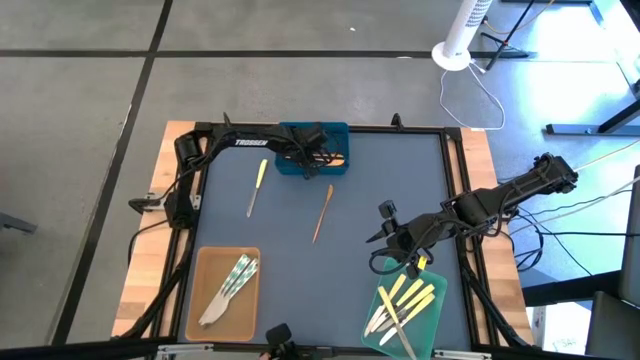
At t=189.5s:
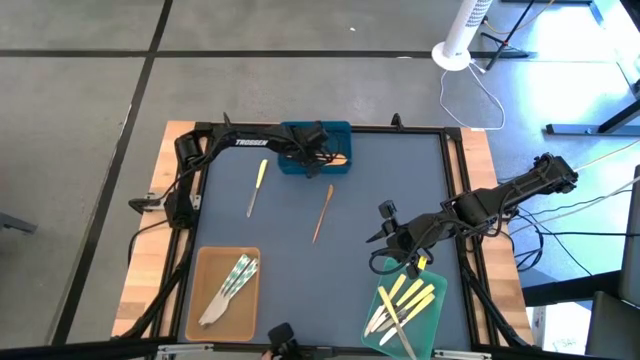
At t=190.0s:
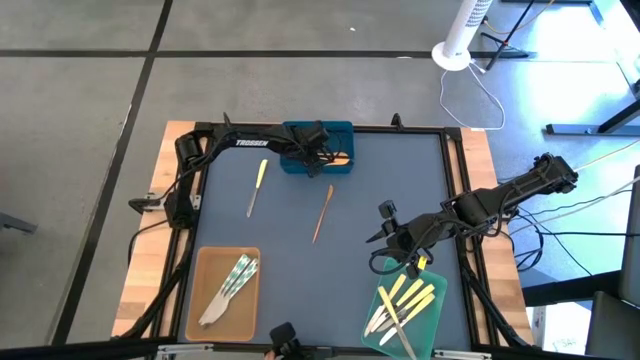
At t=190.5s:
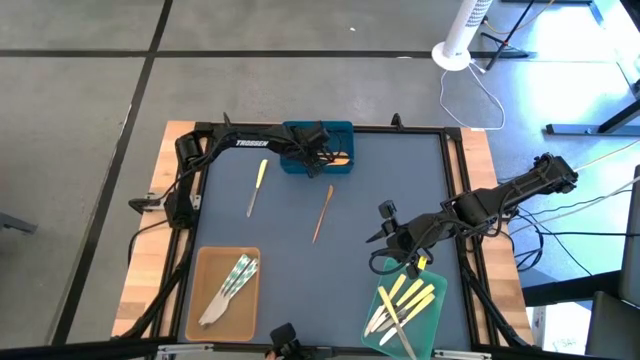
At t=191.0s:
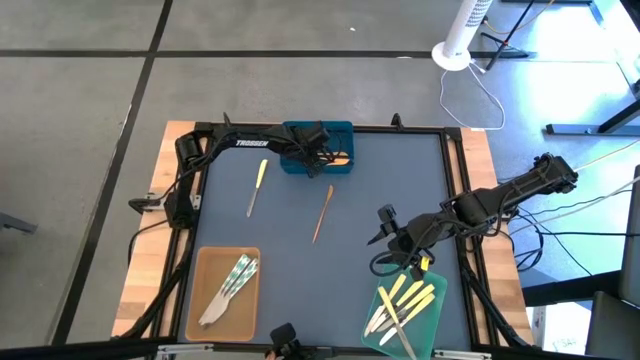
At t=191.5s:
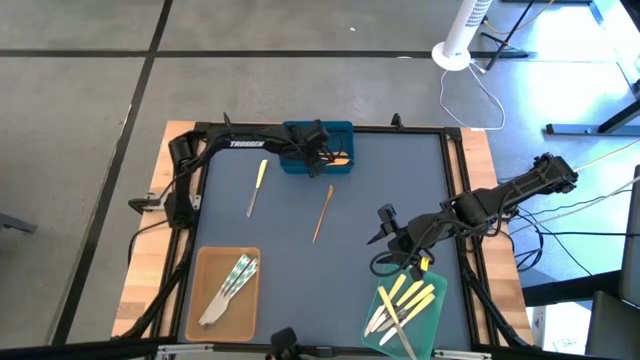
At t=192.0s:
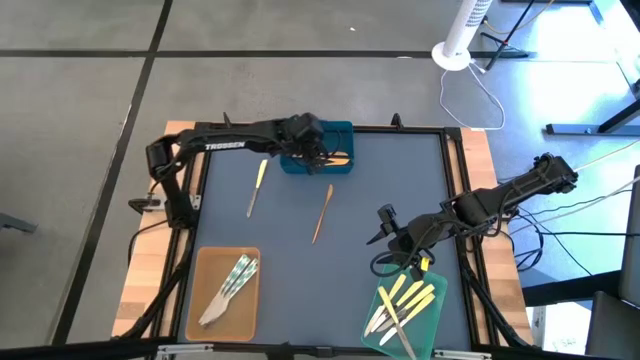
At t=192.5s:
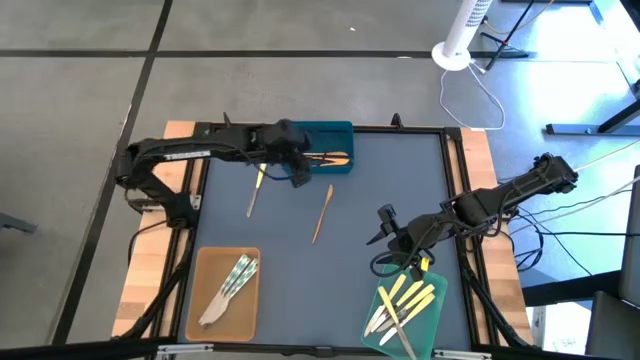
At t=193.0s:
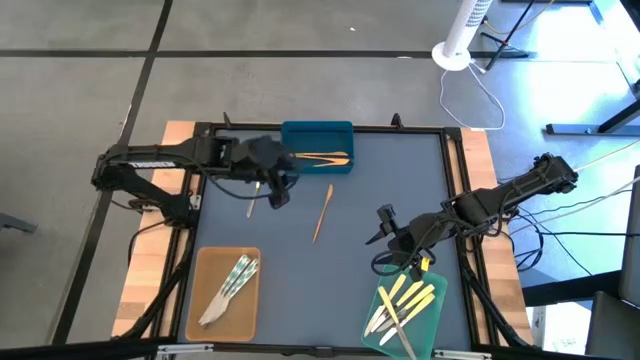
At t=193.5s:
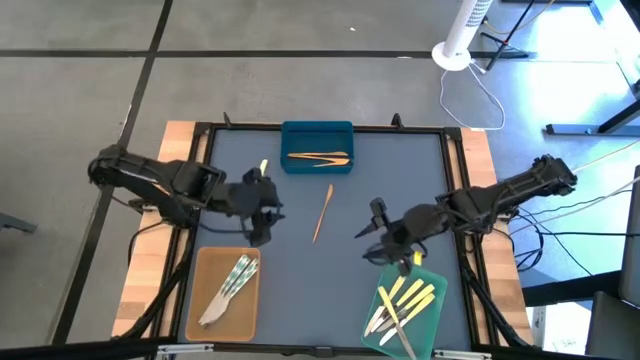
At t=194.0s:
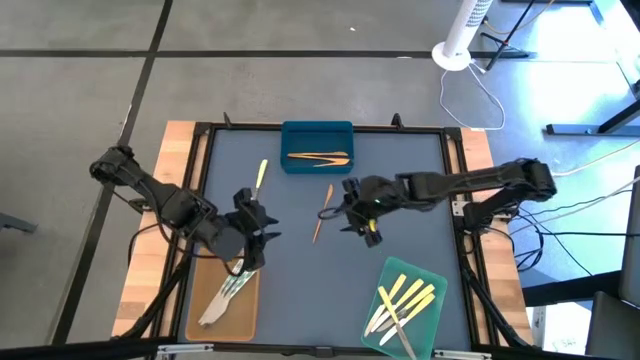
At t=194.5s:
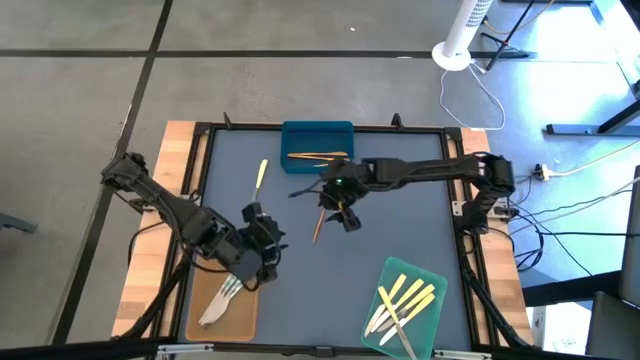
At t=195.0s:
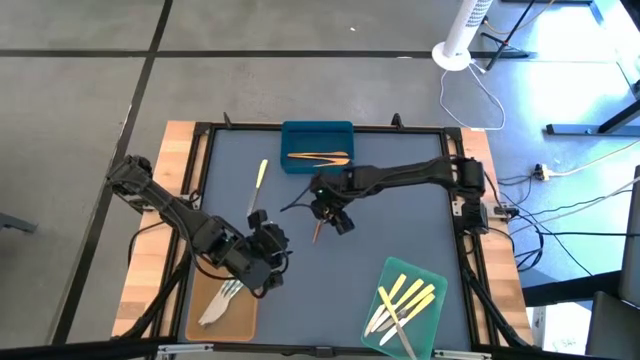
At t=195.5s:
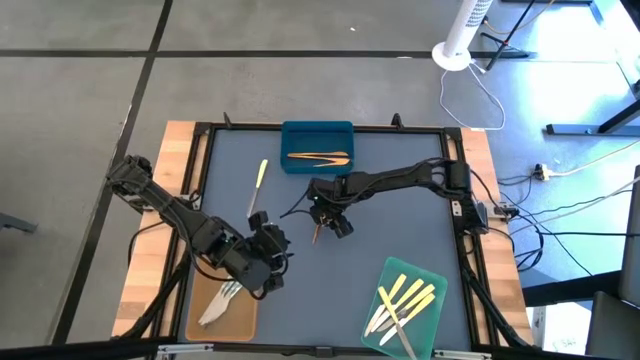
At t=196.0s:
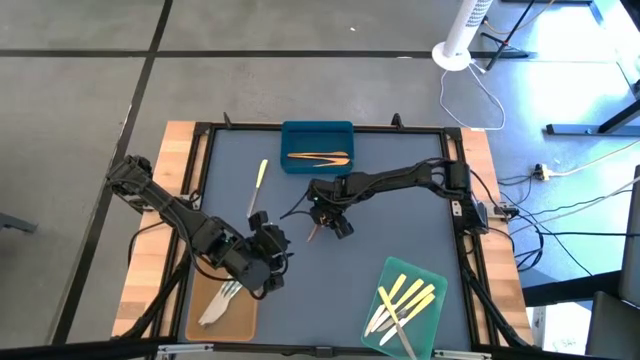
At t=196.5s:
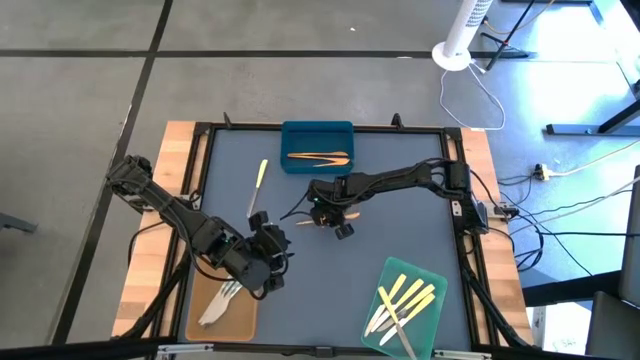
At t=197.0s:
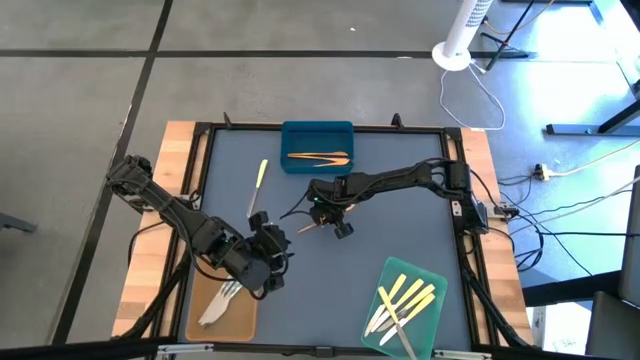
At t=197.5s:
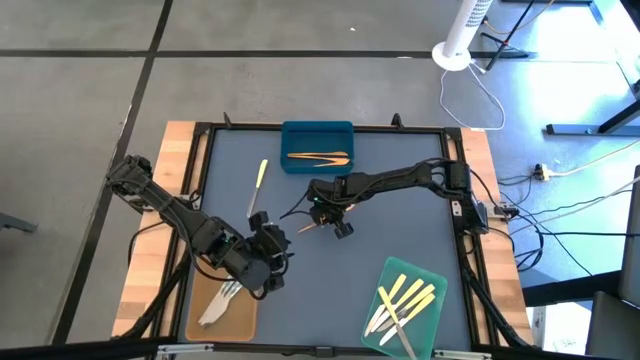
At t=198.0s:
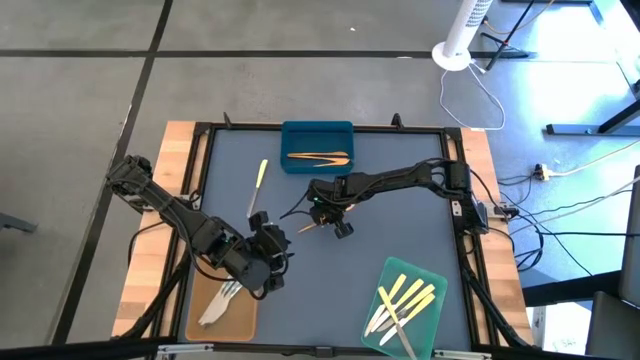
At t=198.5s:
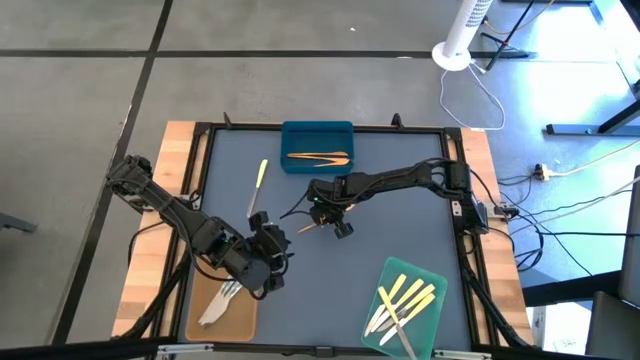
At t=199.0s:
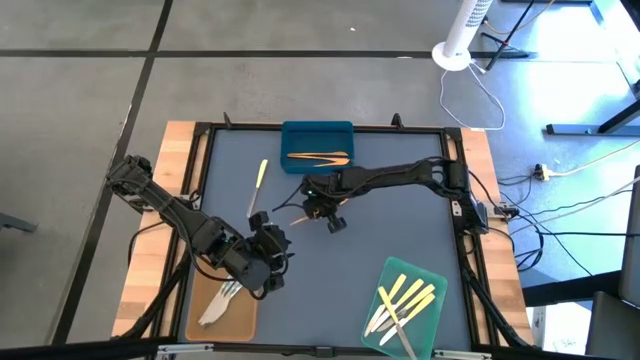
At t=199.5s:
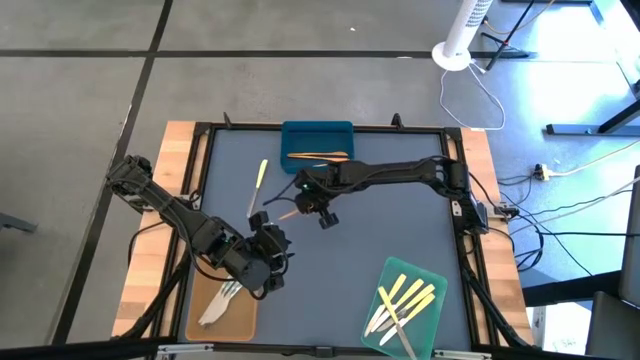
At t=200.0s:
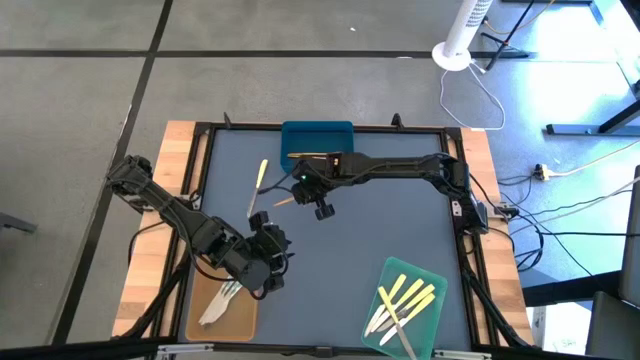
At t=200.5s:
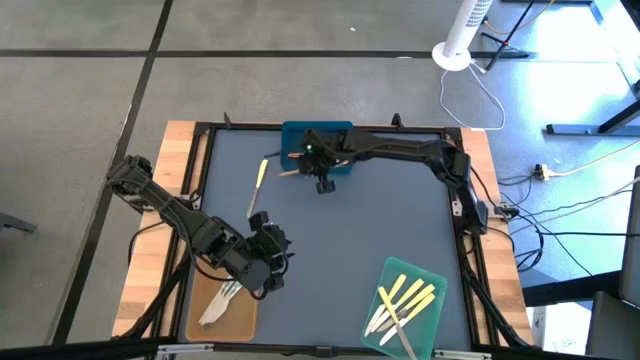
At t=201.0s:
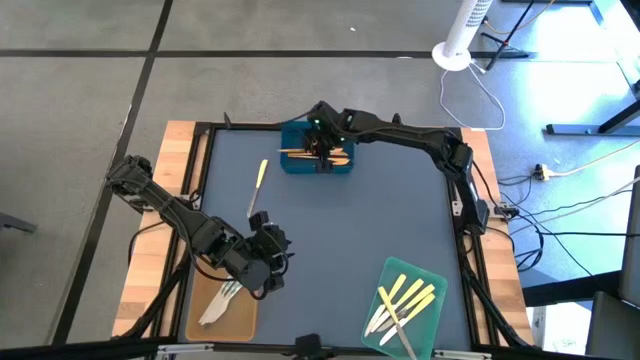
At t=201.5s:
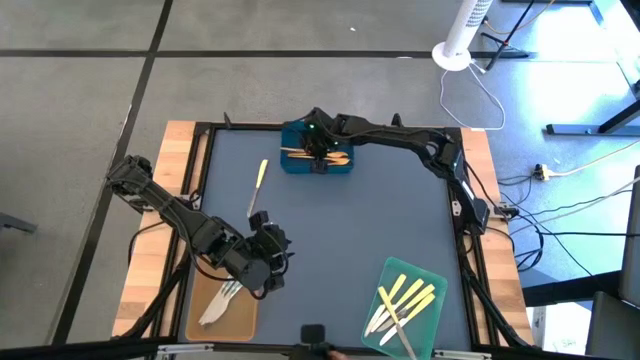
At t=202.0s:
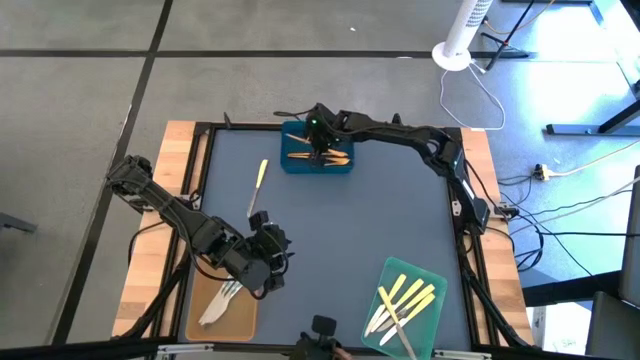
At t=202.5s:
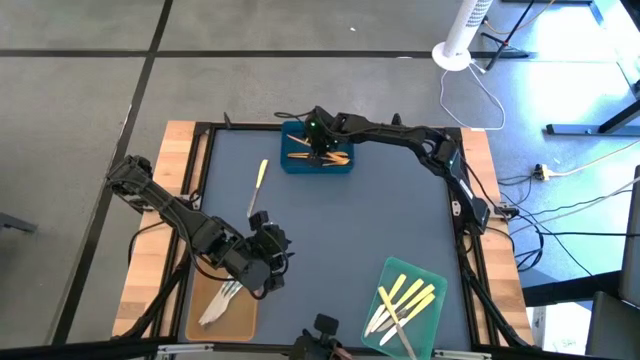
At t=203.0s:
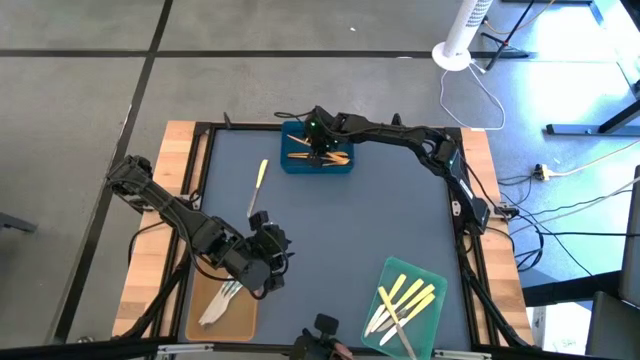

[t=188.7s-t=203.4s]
Task: Sort silverware by color (type)
Put the gold knife into the blue bin

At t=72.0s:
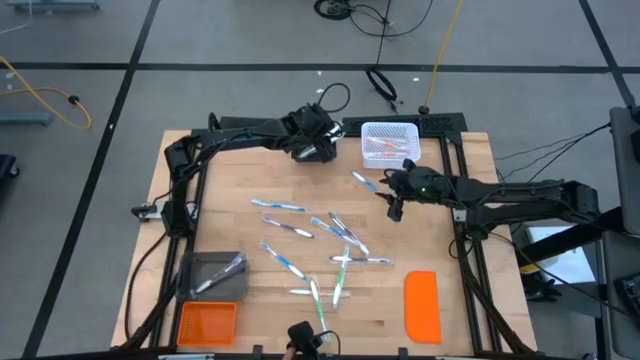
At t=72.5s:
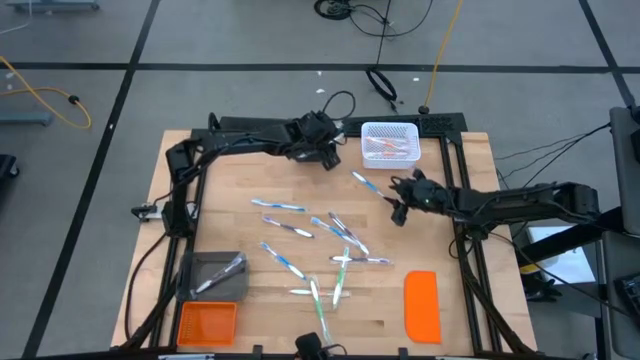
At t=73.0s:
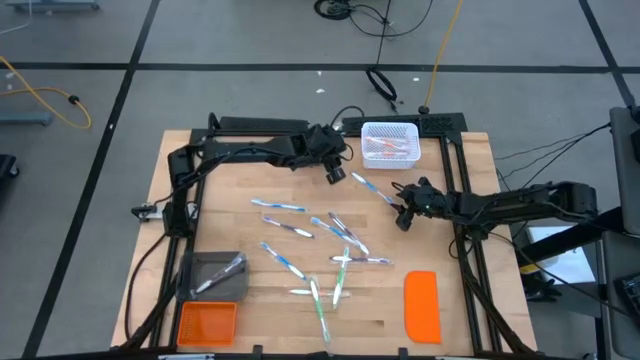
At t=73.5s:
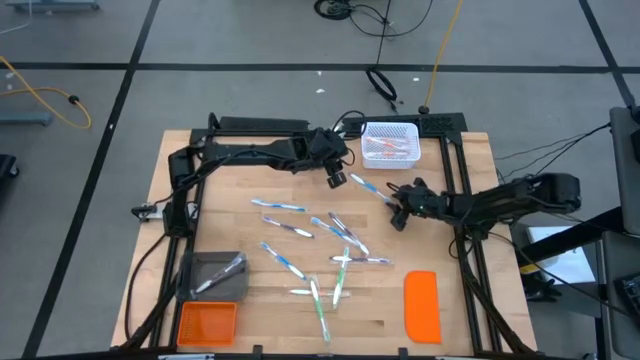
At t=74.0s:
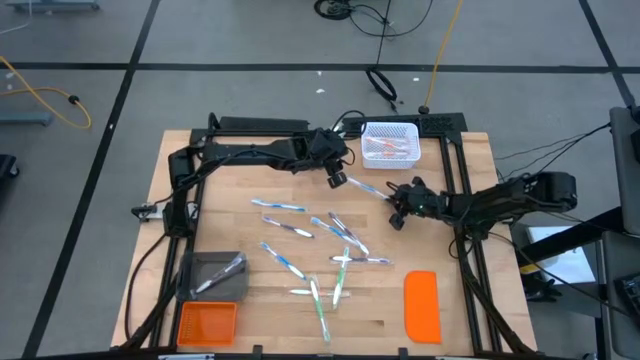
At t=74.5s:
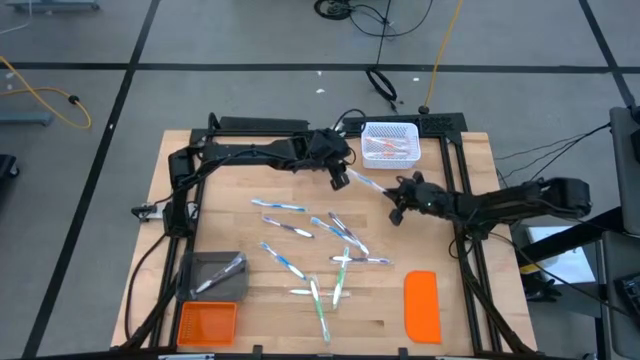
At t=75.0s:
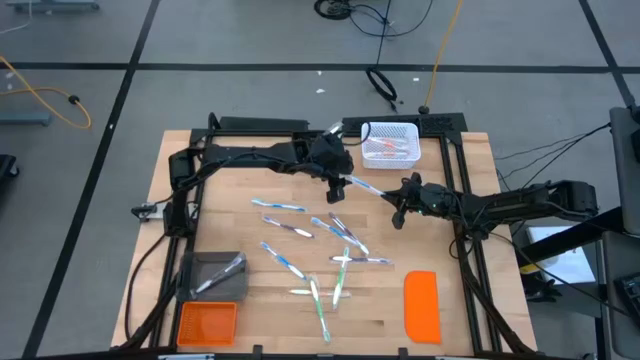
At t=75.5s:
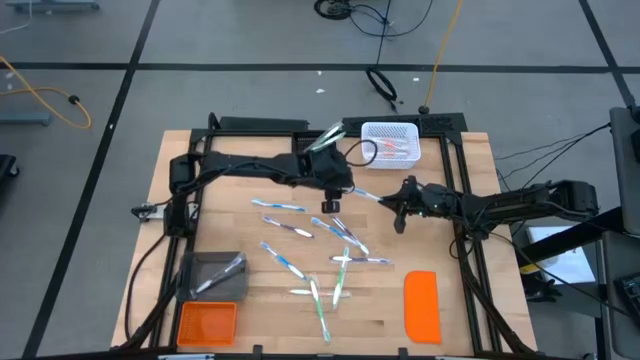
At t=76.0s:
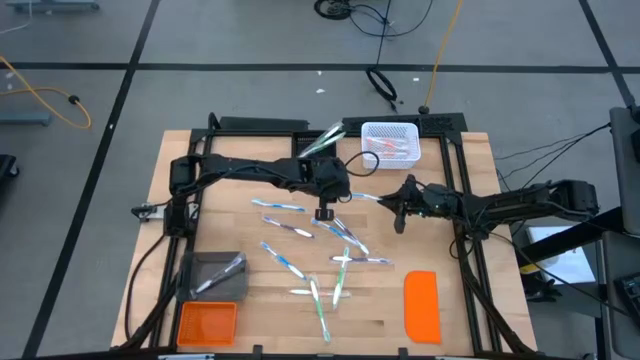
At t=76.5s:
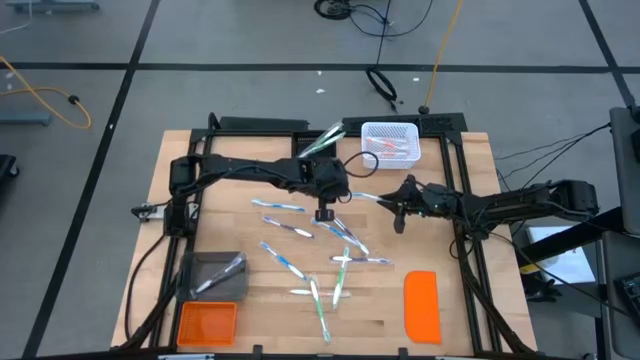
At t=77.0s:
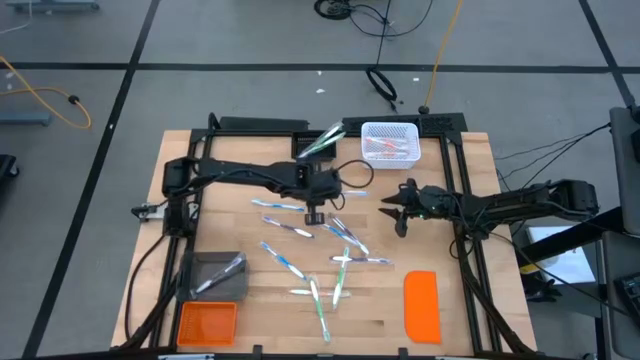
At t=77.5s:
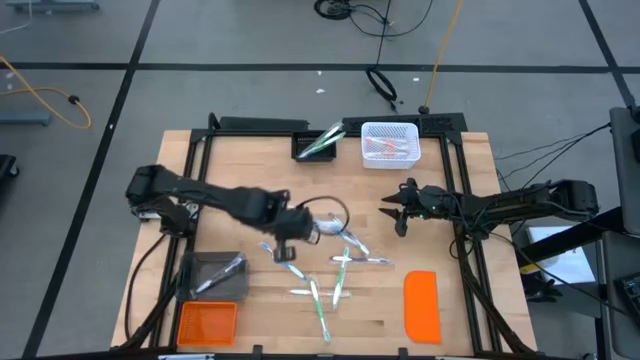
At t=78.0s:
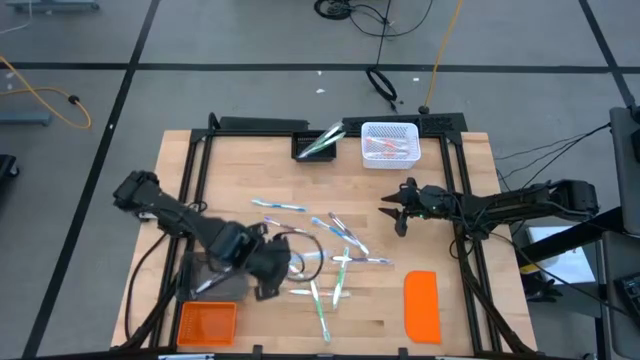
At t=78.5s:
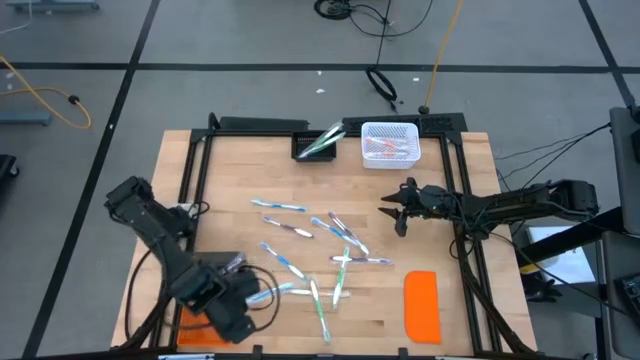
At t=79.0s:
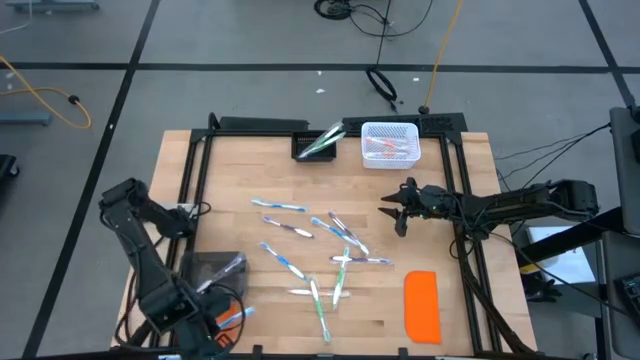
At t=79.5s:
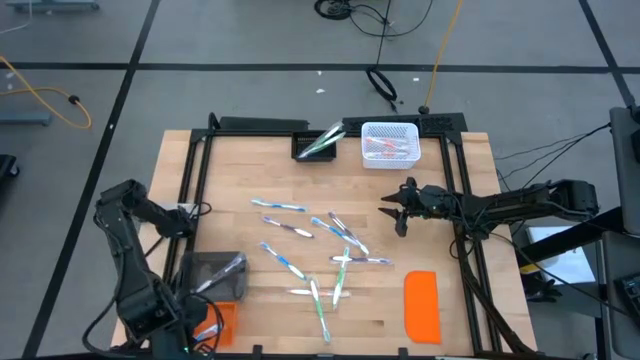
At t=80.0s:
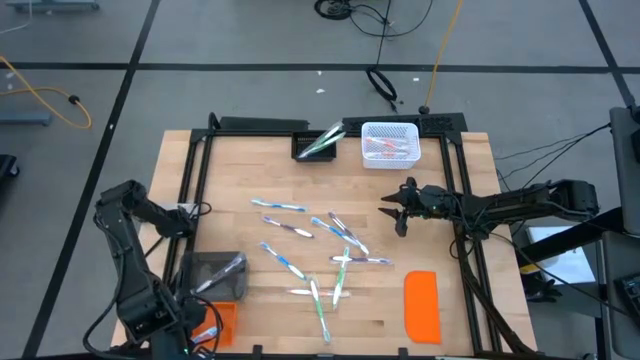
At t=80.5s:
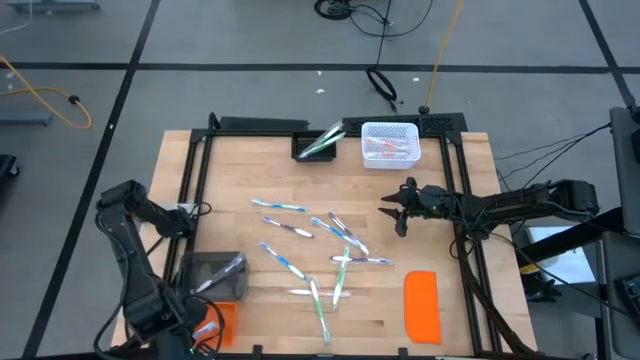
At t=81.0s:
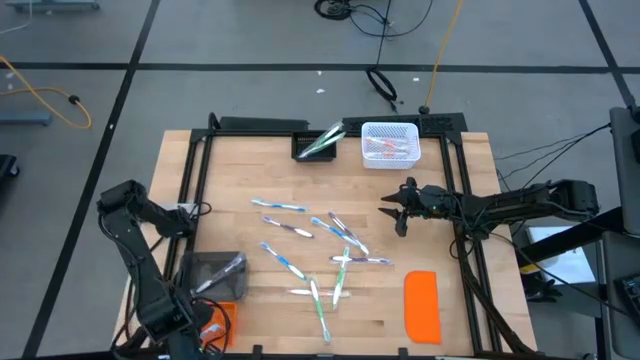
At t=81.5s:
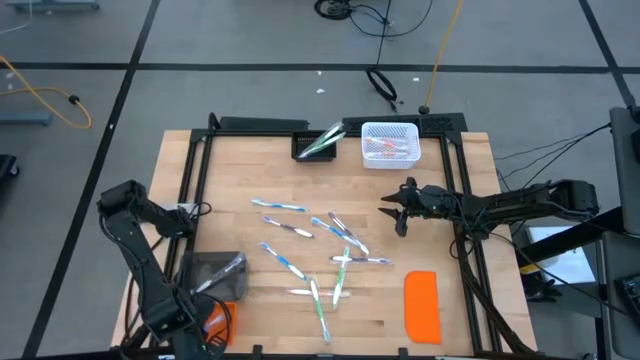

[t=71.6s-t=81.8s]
Task: Pick & Place Toothbrushes
Put the blue toothbrush into the orange bin
